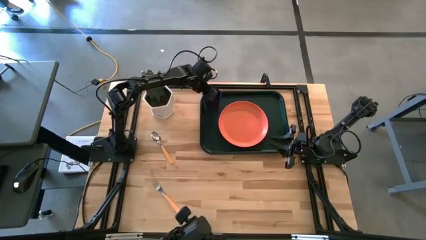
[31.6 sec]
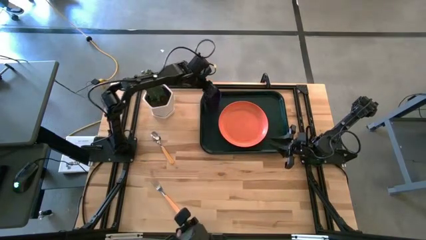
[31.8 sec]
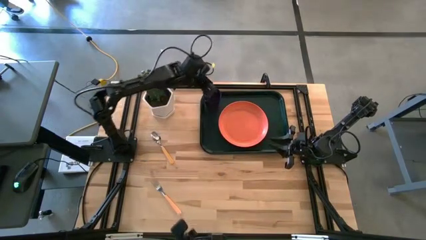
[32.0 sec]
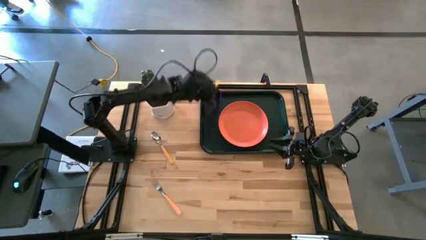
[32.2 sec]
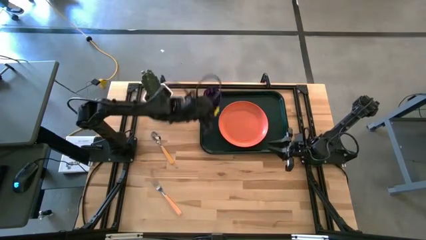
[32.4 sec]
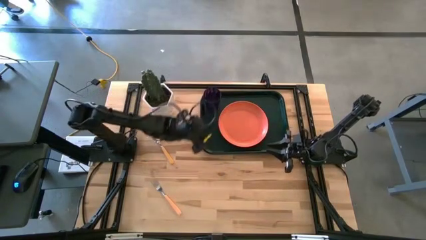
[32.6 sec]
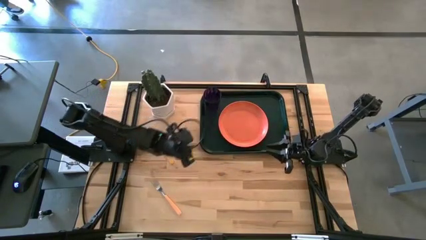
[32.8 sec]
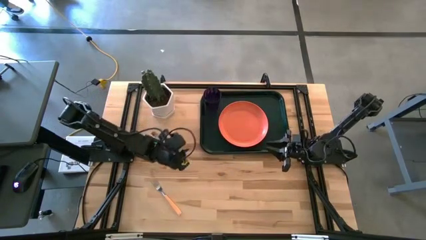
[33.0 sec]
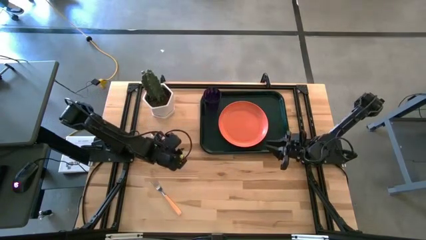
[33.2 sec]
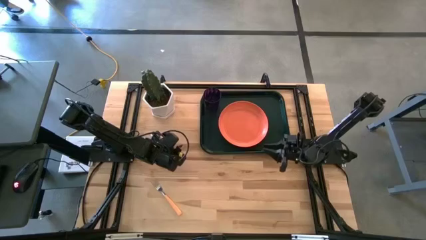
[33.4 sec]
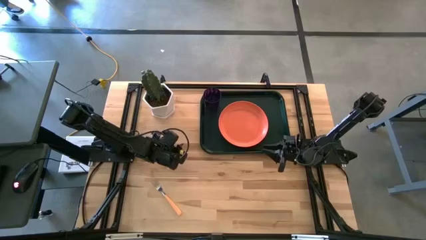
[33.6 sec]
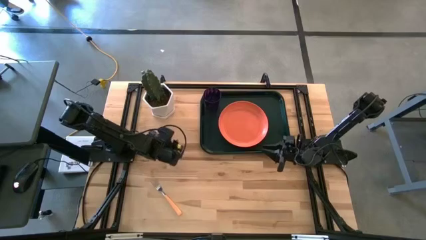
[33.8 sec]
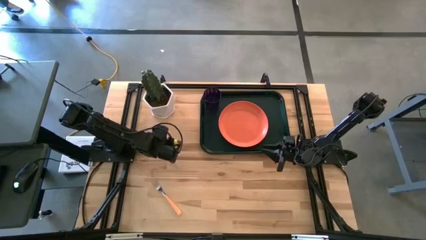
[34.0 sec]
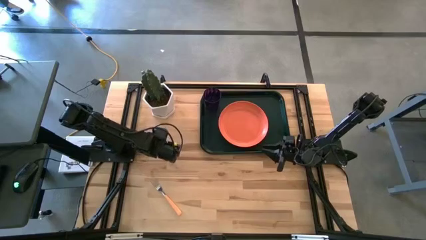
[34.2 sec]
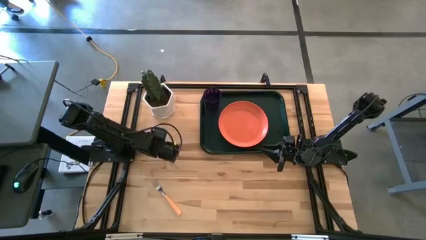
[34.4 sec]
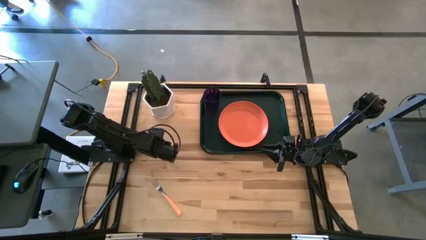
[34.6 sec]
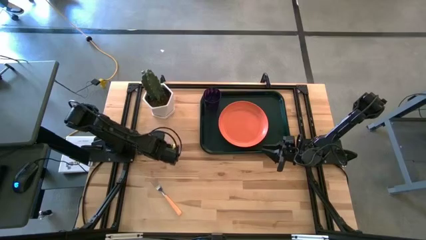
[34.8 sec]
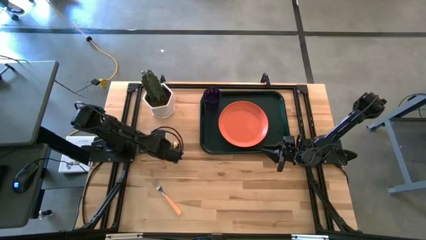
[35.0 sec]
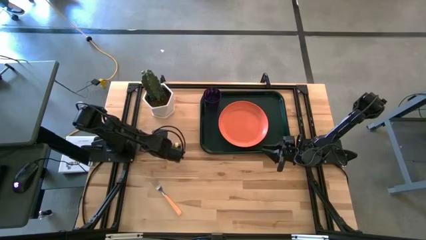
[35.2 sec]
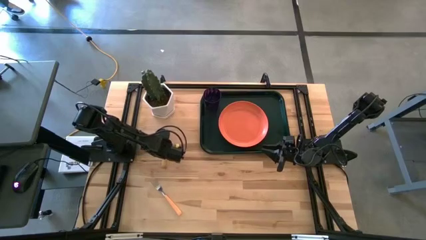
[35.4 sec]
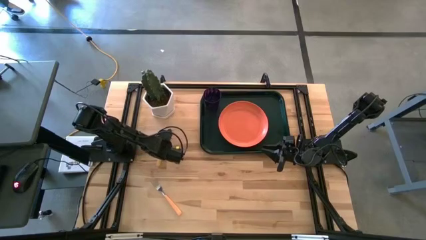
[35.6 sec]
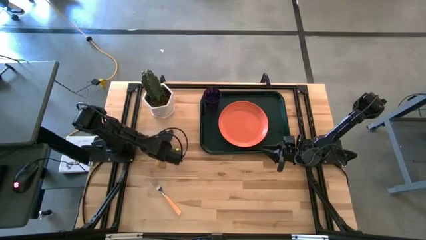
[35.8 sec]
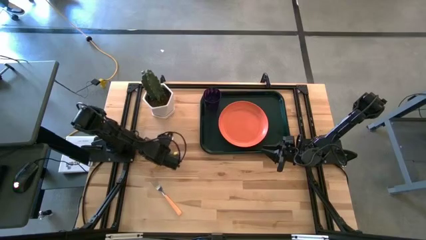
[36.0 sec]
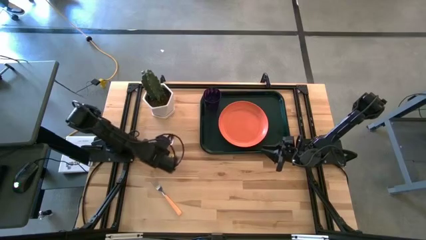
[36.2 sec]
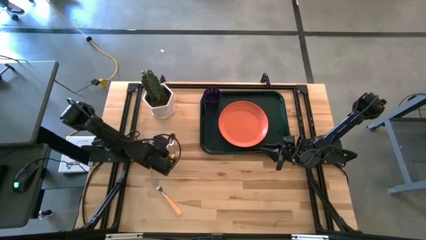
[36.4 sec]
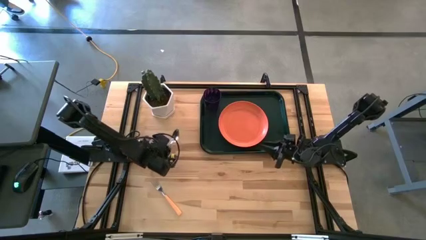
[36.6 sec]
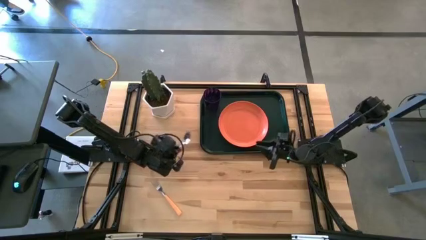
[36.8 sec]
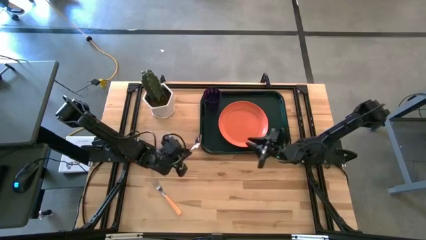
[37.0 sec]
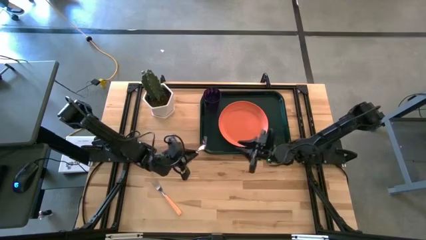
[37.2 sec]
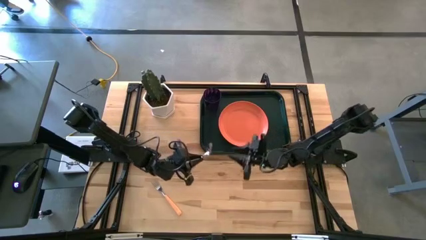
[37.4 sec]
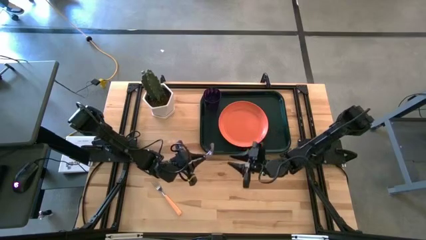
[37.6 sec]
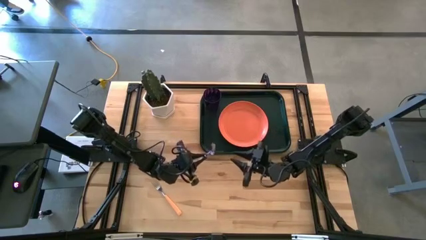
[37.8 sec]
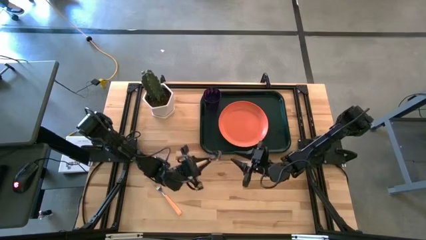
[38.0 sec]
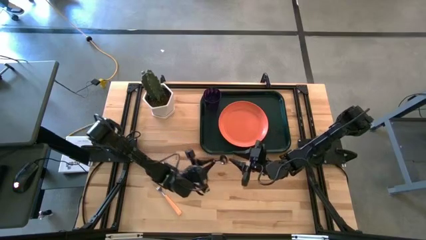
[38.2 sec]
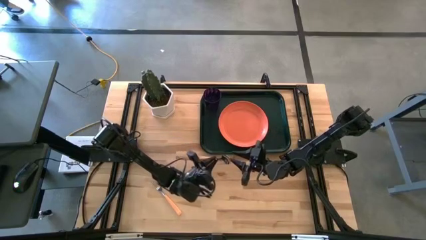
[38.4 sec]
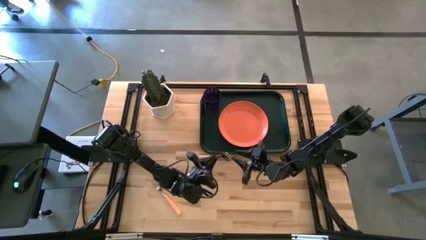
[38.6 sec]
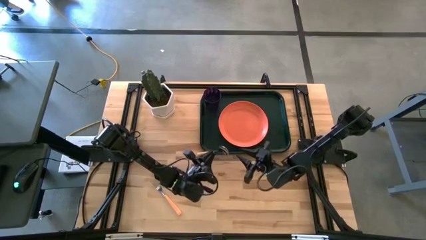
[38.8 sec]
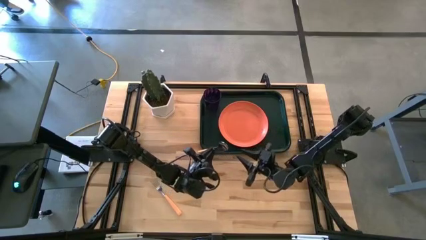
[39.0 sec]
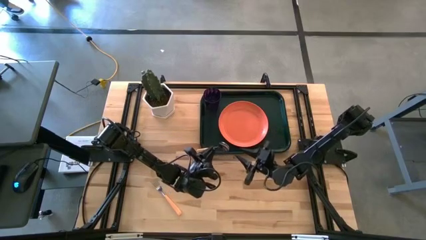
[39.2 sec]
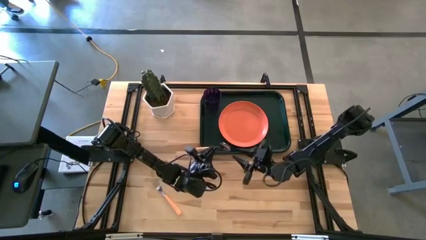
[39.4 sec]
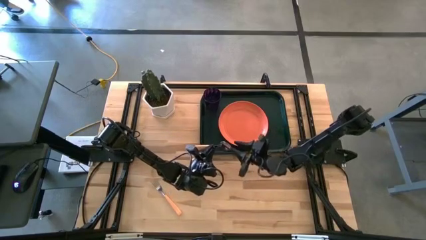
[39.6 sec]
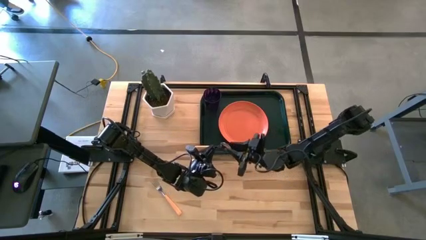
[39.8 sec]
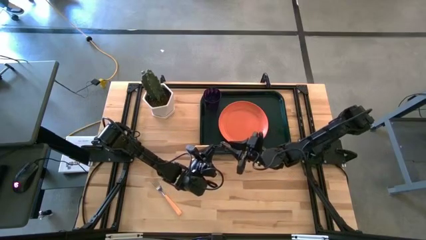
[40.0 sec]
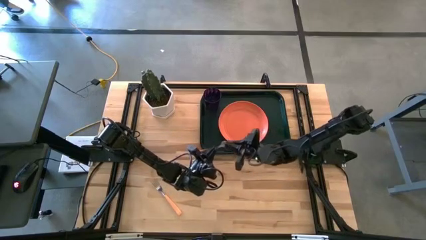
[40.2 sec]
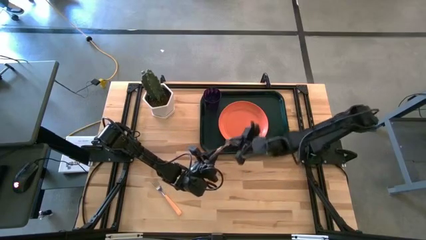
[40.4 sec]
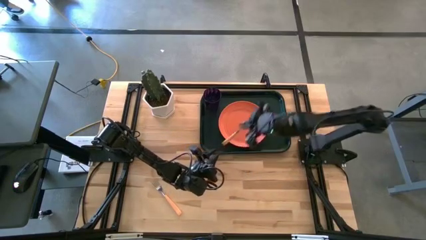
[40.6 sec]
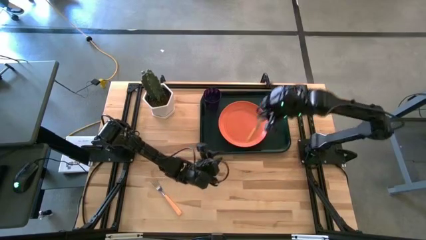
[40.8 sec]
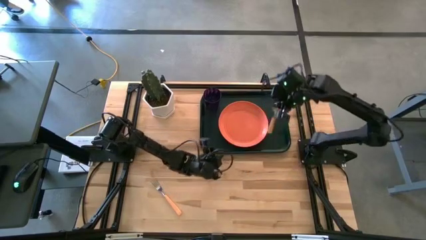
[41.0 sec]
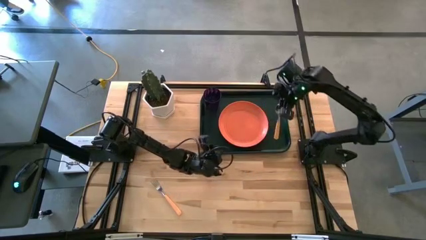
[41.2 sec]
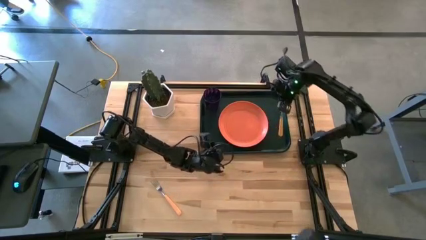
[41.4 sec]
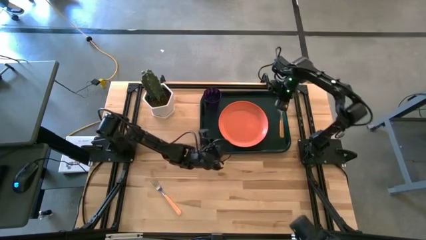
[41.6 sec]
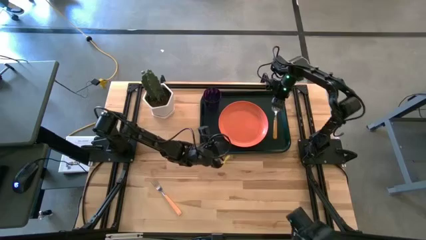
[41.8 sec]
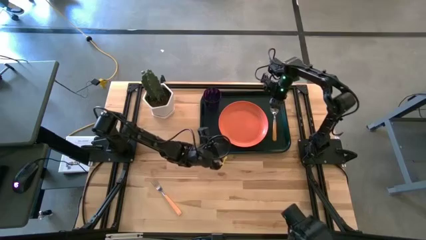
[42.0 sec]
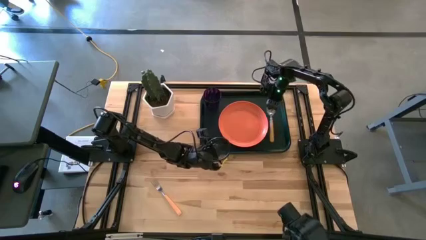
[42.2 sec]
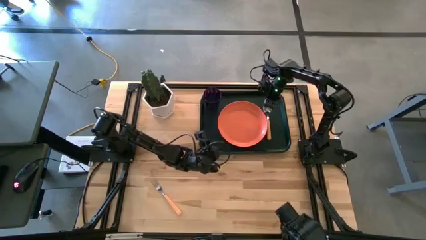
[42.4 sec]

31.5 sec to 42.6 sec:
Task: Pick and place plate/cup/fork/spoon on tray
Put the yellow spoon on the black tray to the right of the orange plate

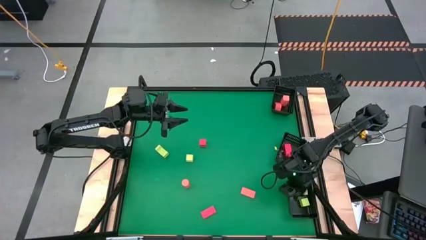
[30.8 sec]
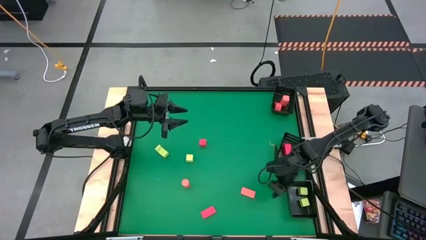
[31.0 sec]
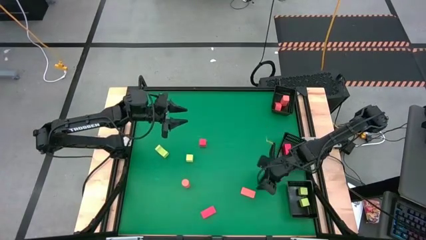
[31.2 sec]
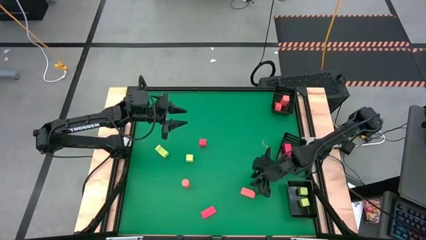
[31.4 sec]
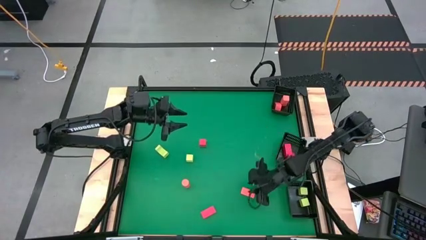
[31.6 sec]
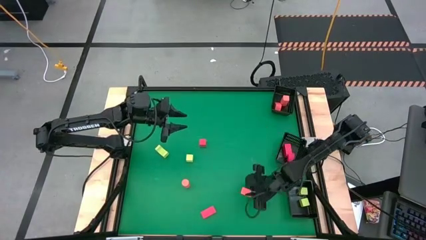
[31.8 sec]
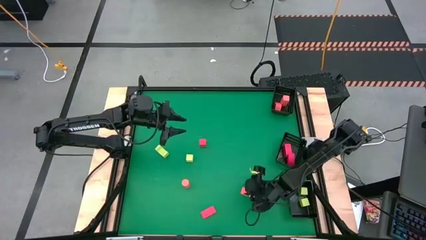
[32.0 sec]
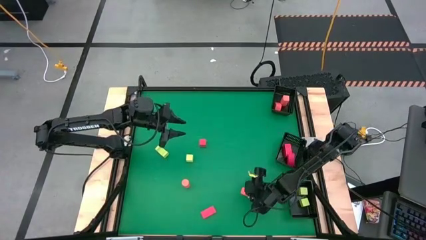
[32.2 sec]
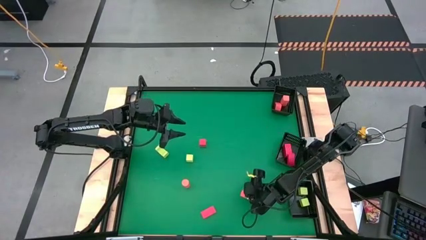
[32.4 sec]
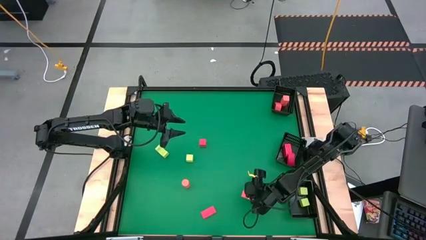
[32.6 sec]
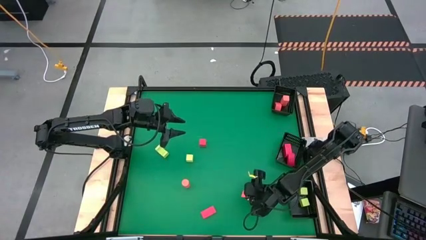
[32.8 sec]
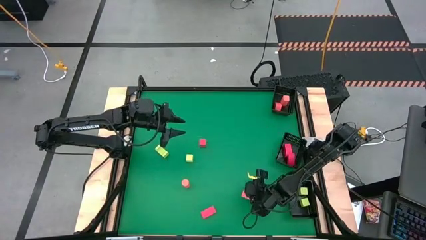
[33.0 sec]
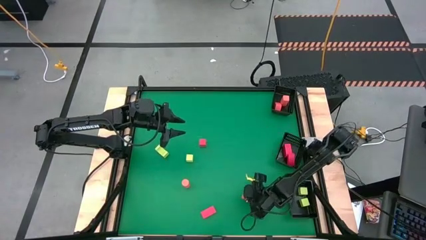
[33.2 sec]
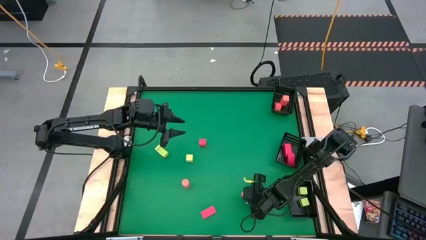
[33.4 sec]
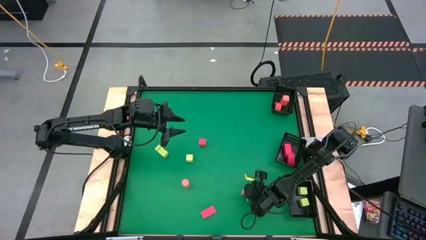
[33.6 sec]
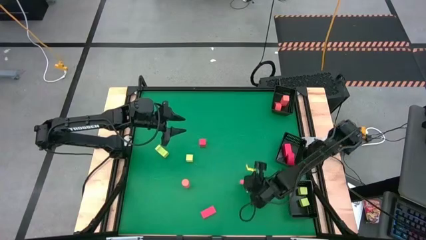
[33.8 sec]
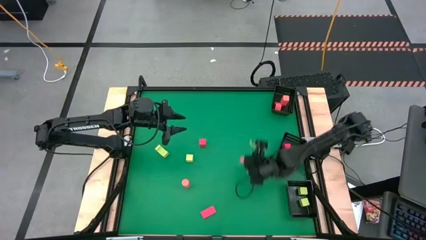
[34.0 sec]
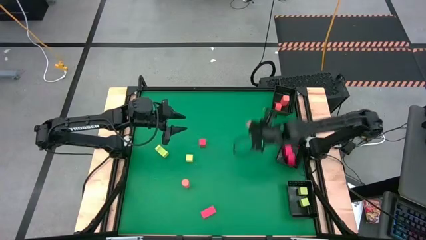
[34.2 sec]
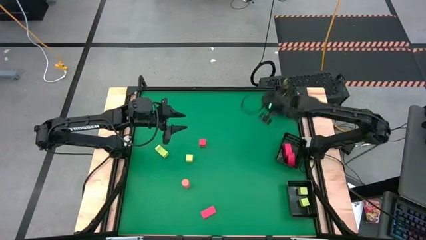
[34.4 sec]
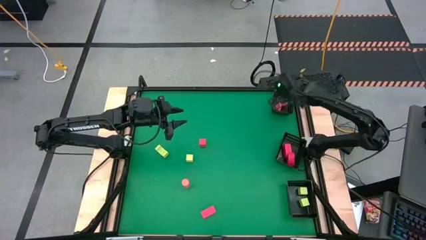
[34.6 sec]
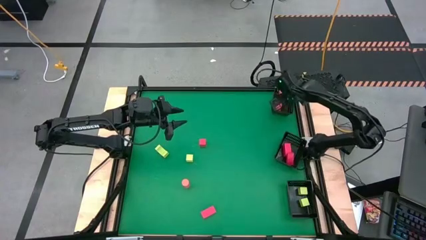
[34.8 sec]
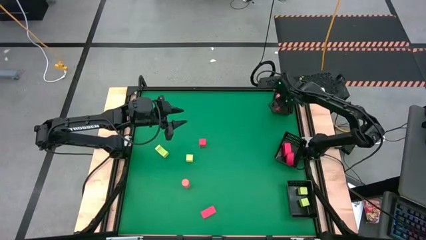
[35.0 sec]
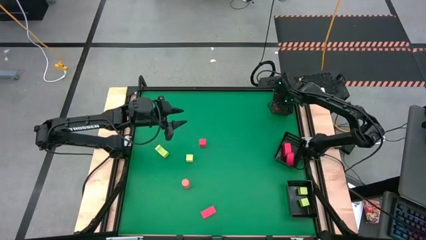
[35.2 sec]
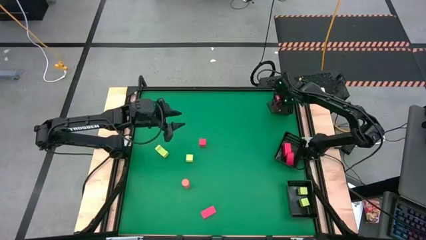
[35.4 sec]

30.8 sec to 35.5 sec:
Task: Sort & place blocks by color
Put the right orange block into the top right black bin
